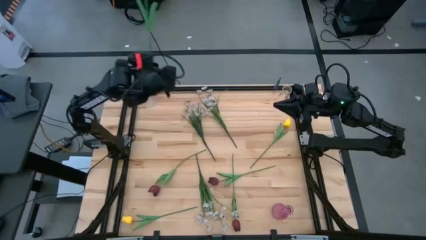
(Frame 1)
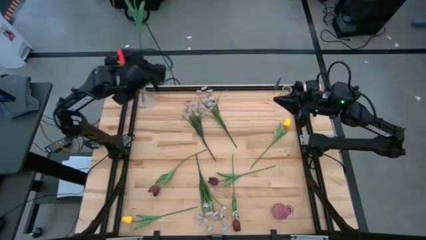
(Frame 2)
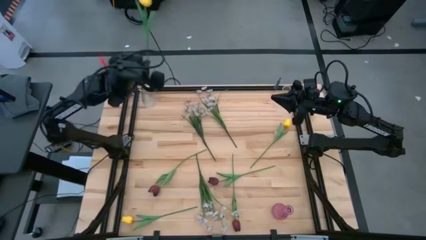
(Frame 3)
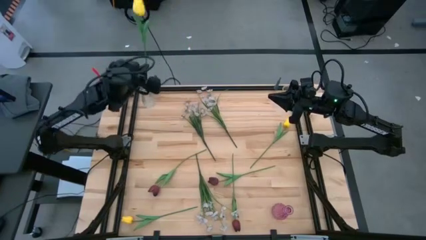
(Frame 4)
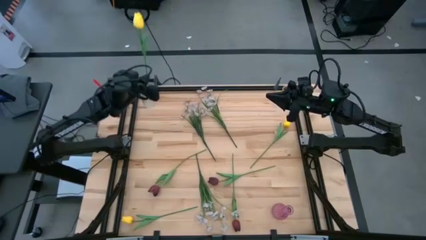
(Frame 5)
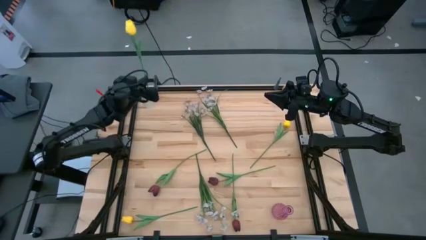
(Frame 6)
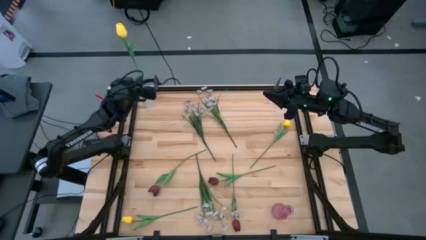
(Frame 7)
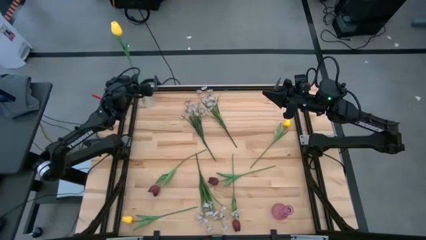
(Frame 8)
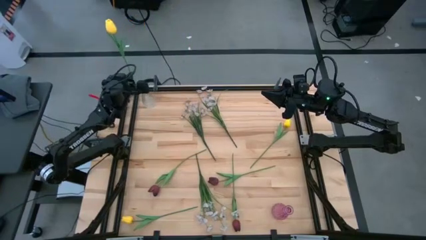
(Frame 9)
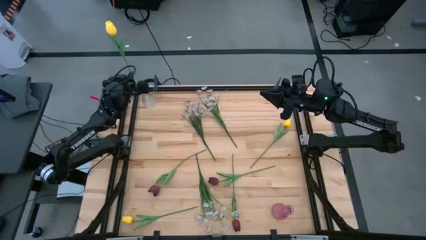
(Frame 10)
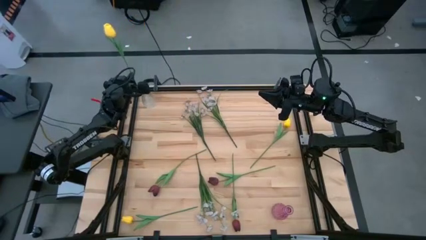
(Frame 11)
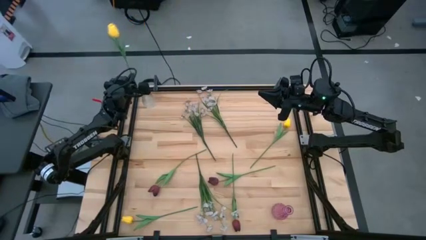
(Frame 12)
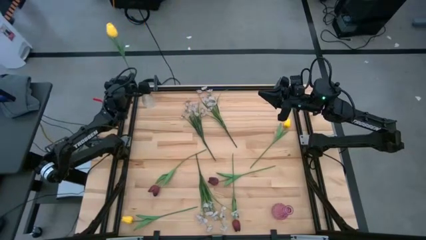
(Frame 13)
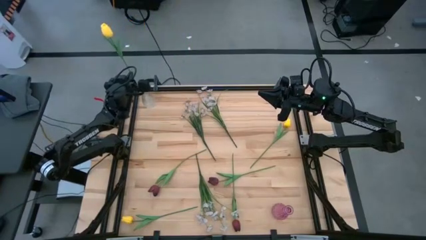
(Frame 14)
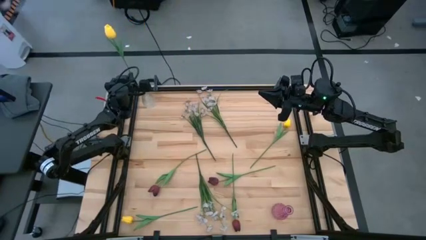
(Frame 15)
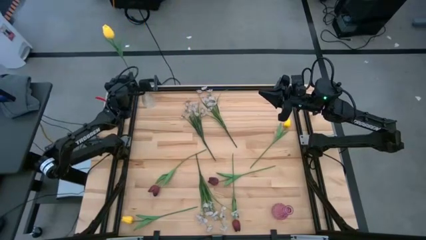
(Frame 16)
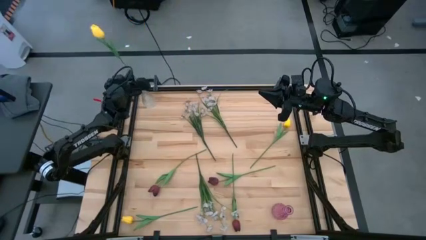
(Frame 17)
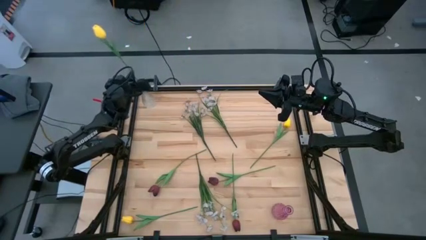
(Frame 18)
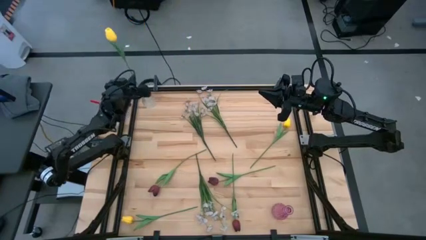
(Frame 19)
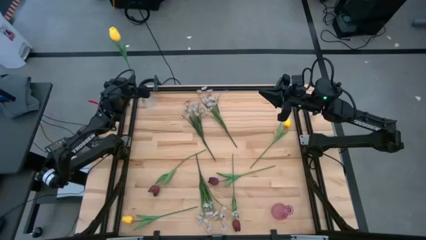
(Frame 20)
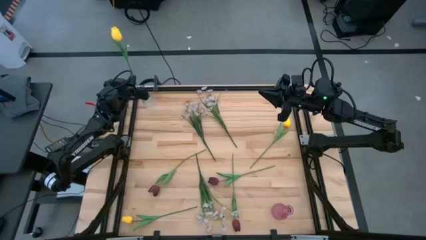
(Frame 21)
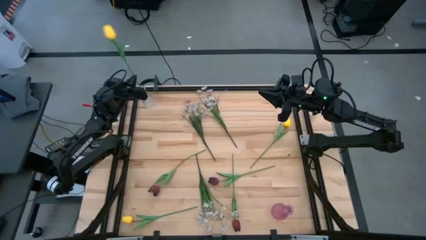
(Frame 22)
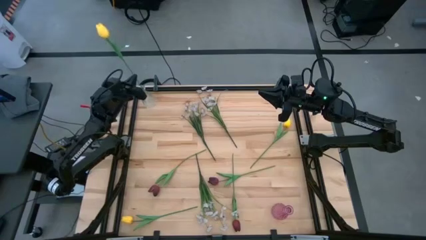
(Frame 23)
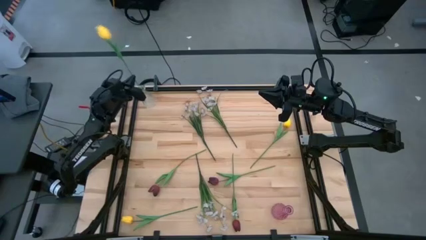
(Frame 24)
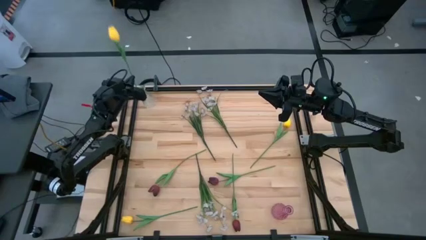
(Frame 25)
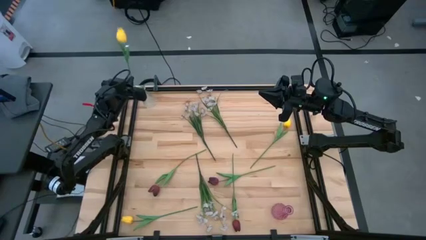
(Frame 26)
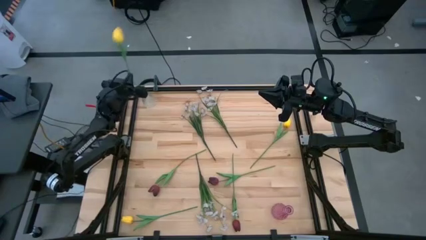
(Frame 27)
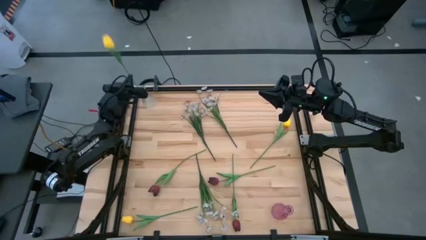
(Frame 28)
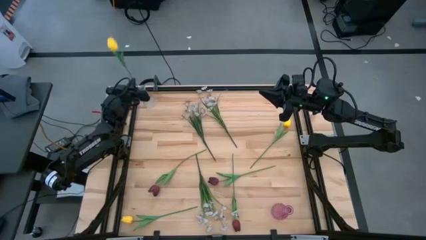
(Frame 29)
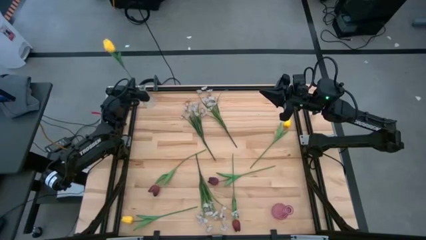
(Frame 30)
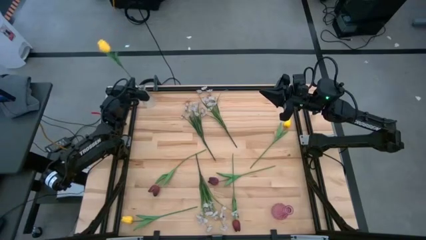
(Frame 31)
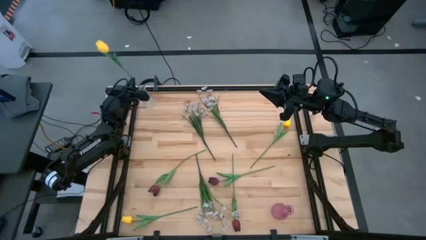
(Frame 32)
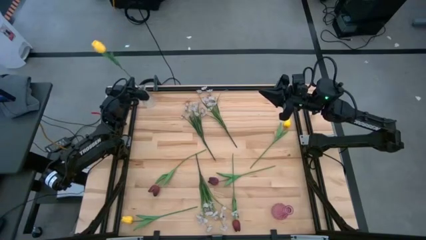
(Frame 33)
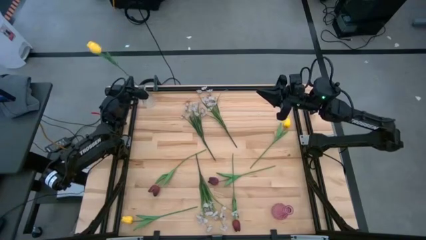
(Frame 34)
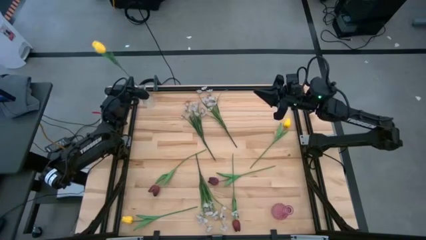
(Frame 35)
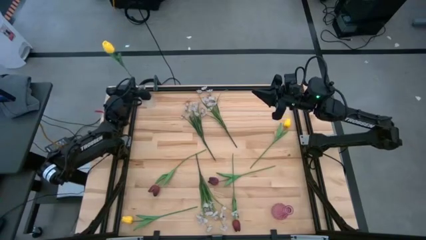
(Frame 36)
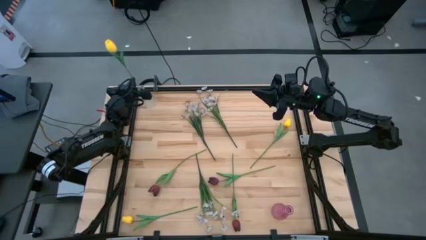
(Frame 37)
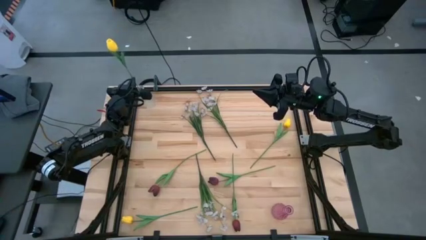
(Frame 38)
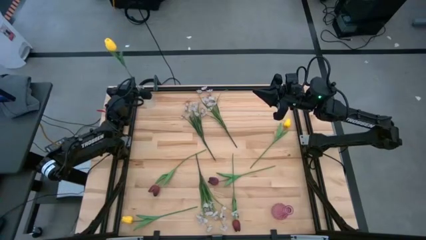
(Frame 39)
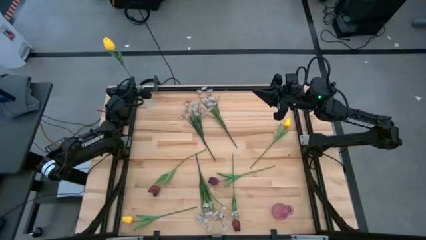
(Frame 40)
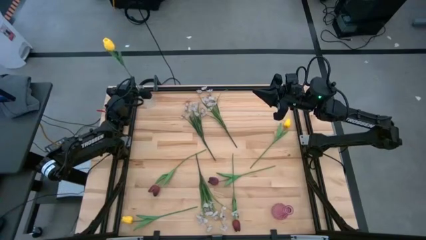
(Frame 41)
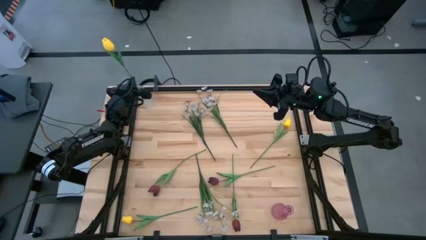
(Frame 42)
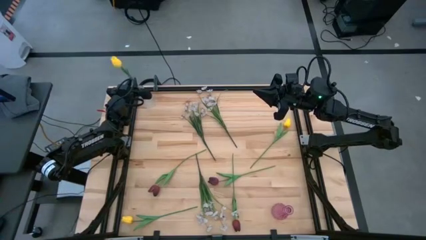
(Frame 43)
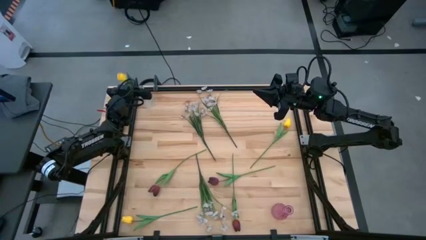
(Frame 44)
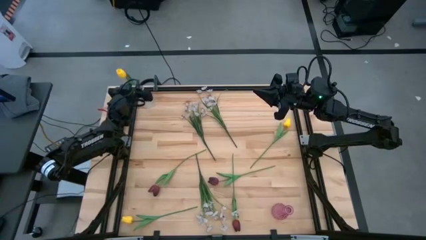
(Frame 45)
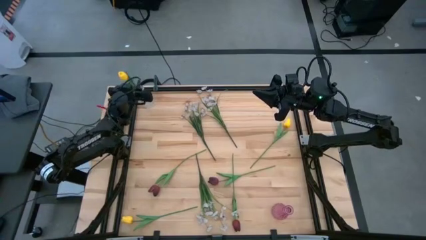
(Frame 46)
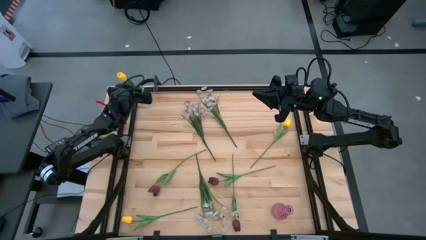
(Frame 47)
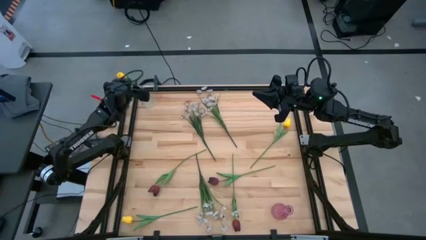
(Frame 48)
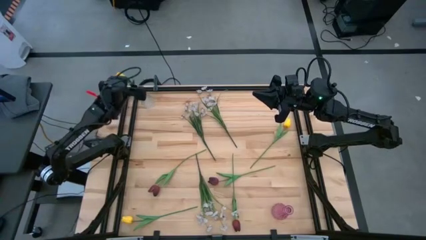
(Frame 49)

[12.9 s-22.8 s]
Task: Sort flowers into vase by color
Put the top left yellow flower into the left transparent vase

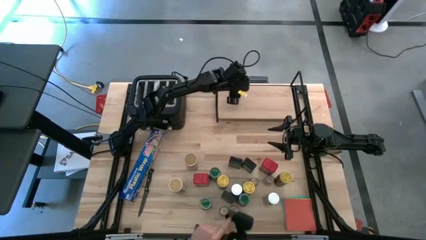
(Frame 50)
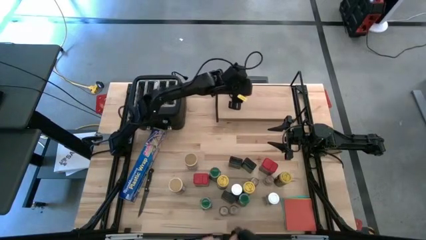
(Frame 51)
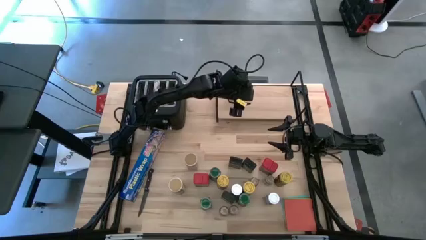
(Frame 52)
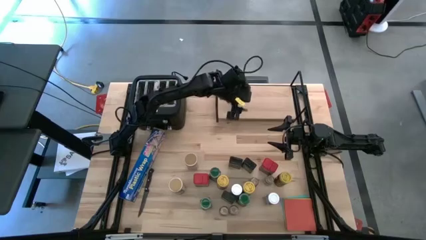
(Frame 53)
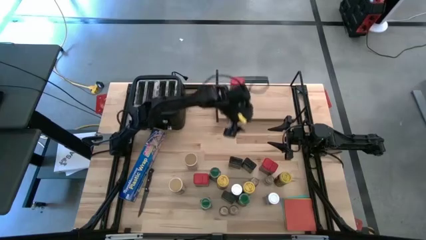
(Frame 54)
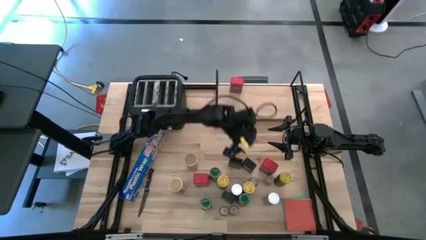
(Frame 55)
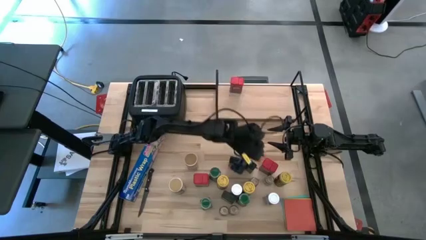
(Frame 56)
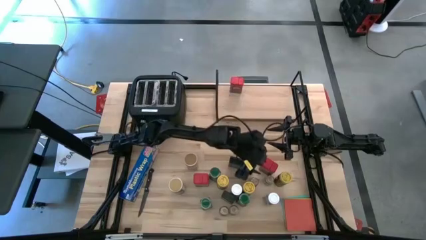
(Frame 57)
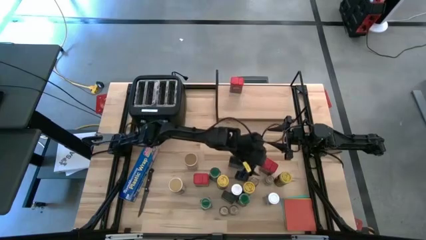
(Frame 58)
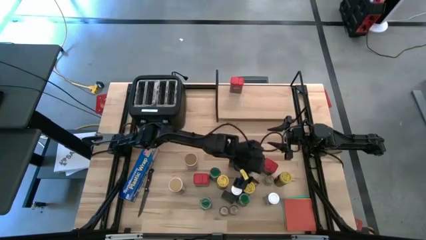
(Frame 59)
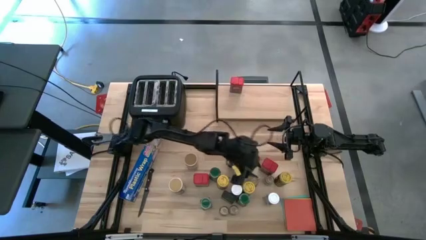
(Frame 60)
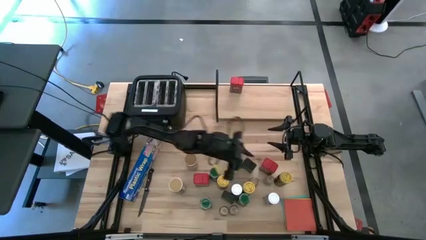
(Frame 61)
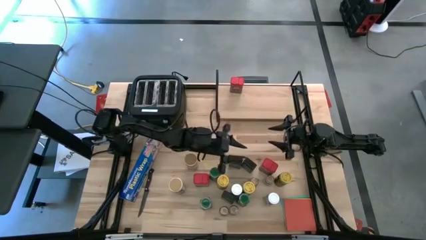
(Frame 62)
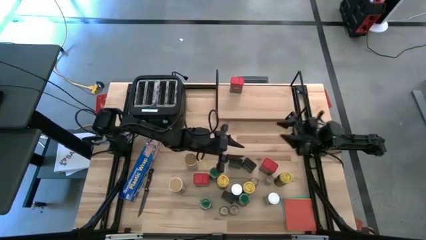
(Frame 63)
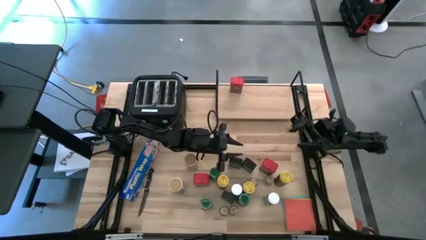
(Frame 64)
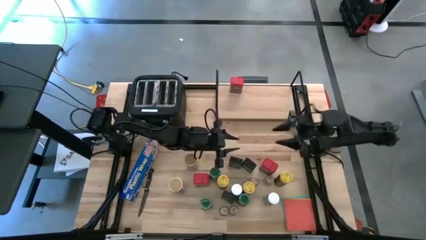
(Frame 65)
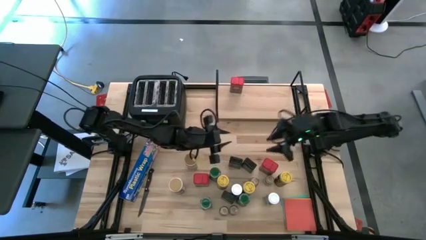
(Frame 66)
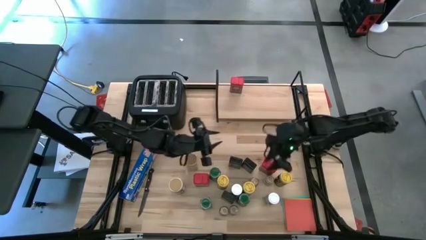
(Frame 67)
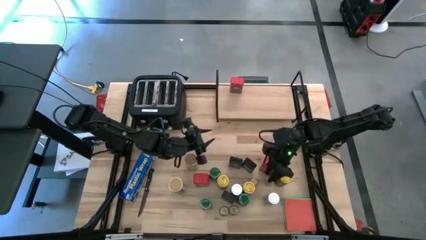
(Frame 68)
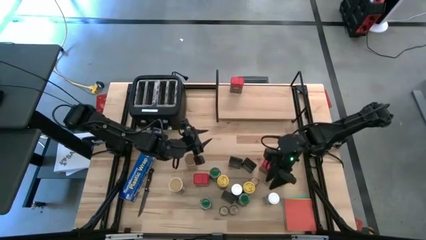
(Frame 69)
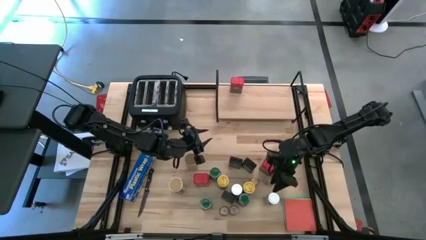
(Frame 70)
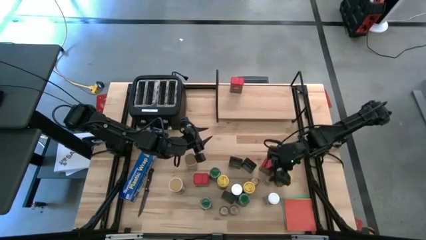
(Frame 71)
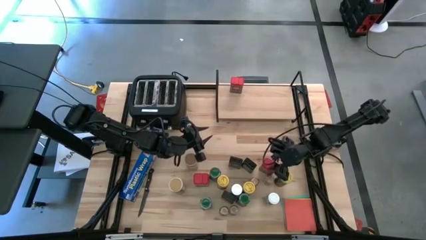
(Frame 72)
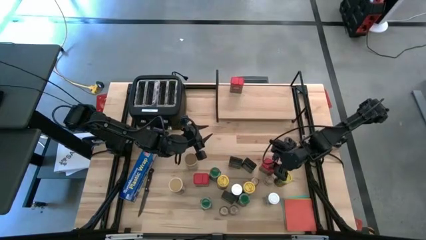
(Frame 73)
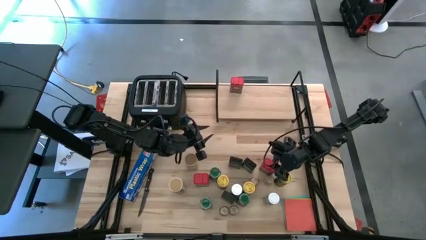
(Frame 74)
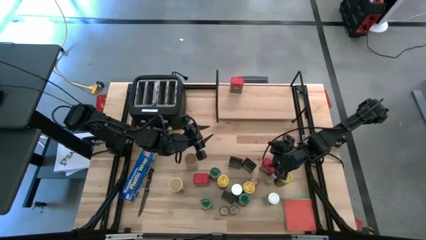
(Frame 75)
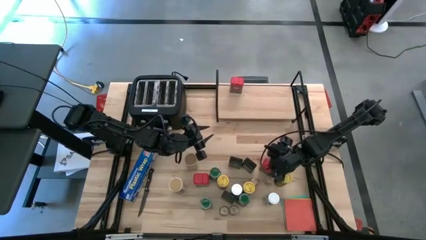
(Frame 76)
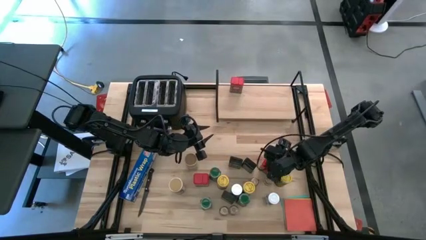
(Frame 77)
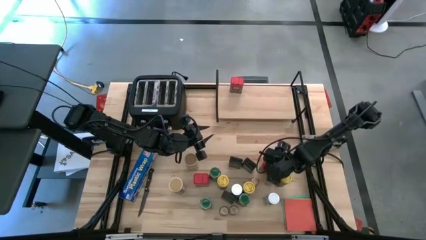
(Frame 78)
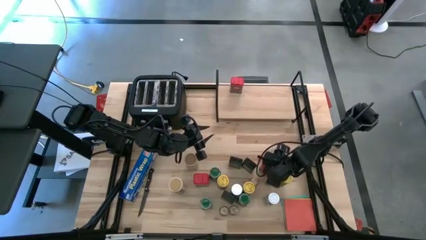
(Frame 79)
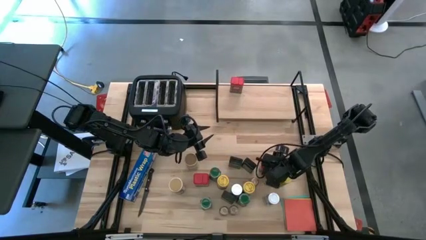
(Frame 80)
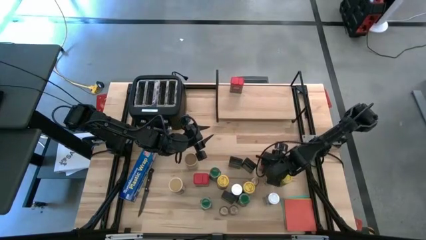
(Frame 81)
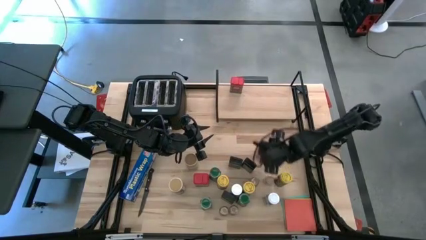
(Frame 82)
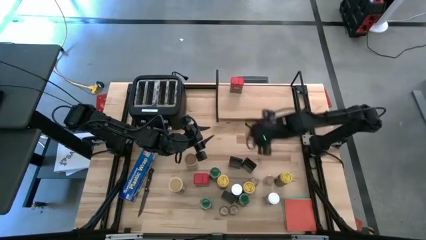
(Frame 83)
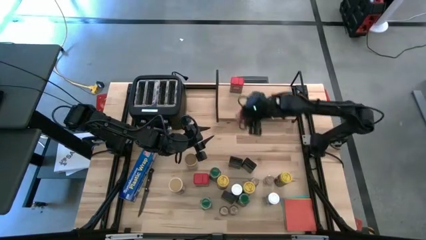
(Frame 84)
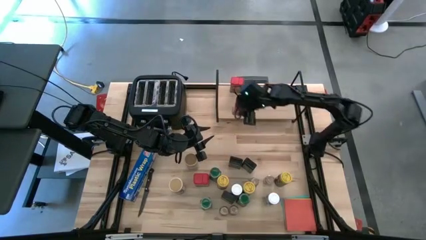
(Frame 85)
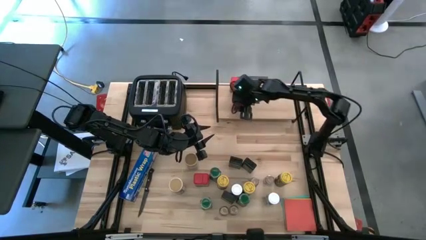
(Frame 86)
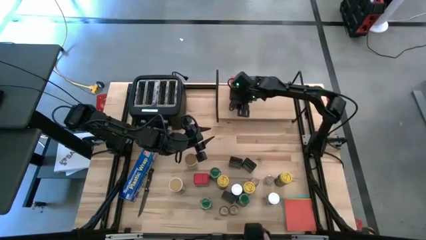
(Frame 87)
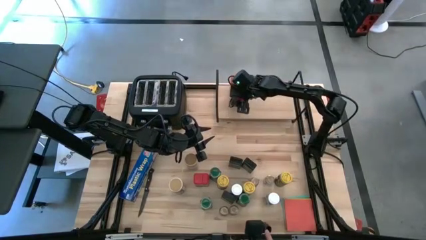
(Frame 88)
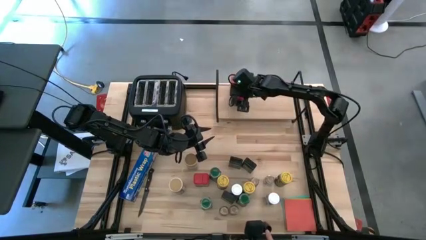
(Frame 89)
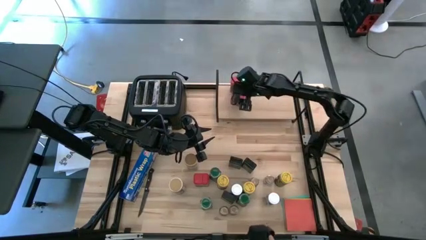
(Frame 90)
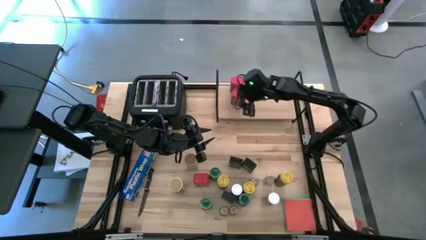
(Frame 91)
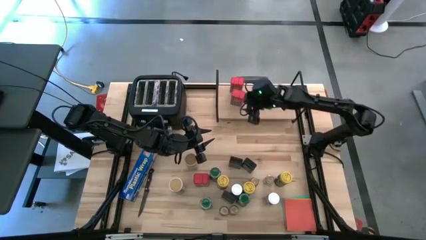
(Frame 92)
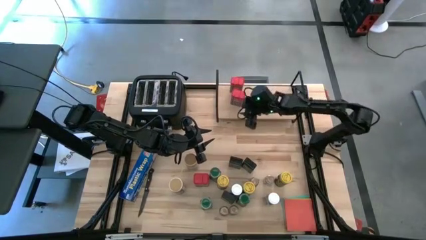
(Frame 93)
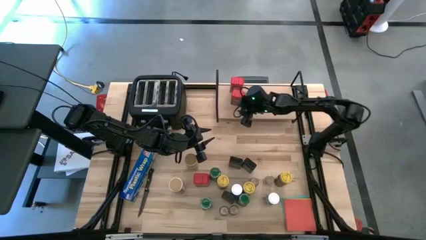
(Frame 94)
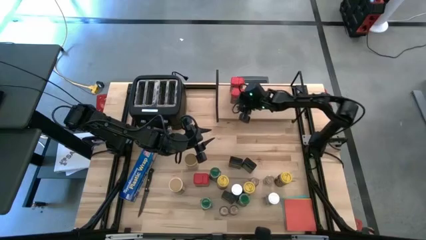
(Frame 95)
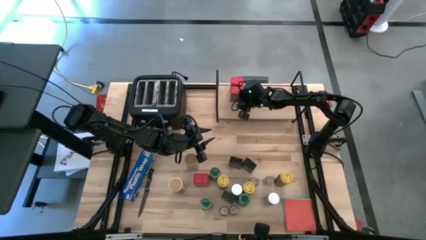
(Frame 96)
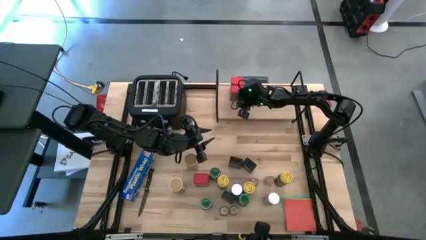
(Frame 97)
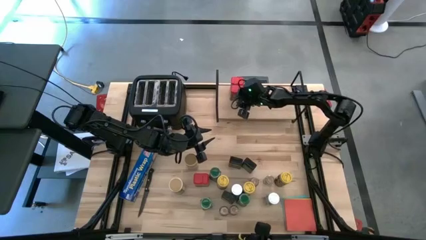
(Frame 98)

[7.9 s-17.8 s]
Task: Shelf spices
Put the right red seasoning can on the shelf aligned with the other red seasoning can
